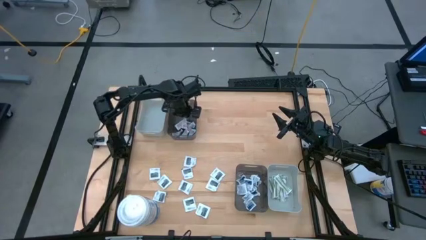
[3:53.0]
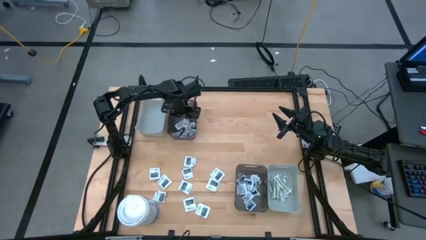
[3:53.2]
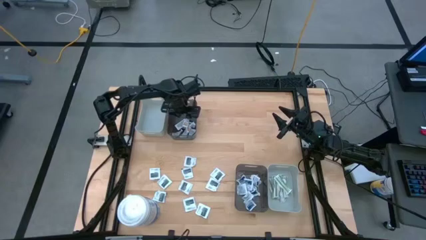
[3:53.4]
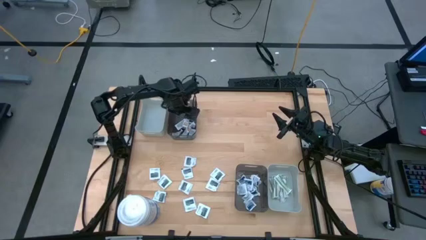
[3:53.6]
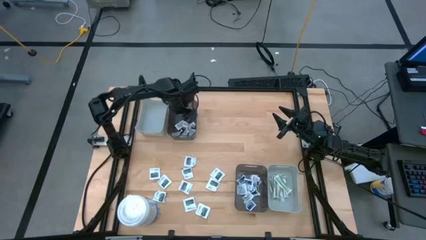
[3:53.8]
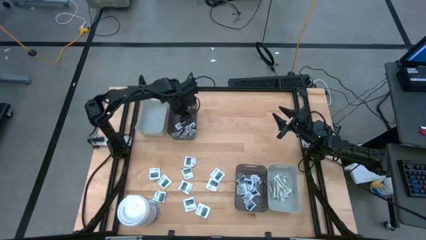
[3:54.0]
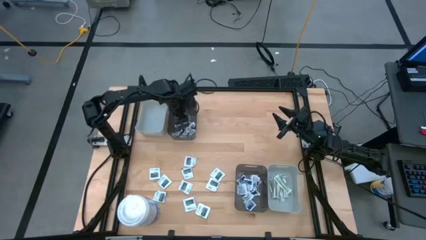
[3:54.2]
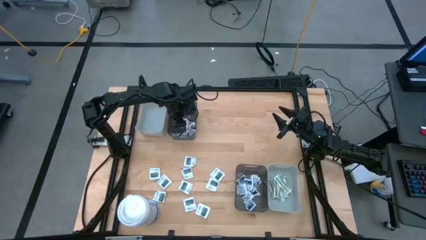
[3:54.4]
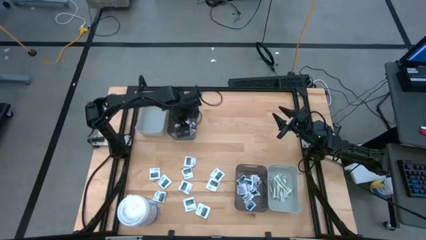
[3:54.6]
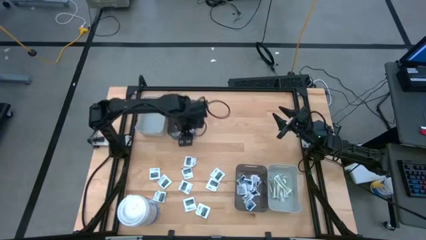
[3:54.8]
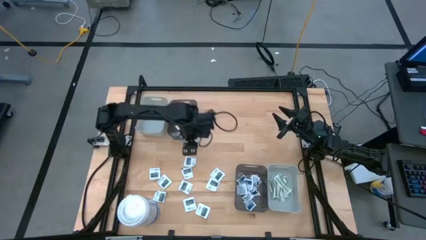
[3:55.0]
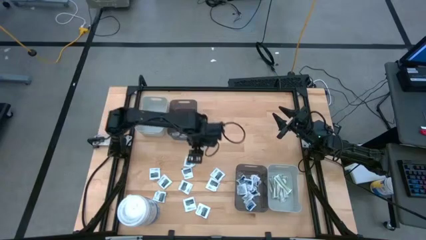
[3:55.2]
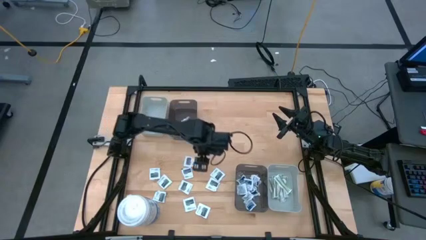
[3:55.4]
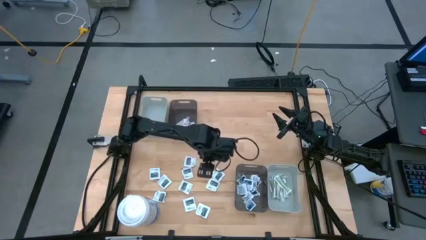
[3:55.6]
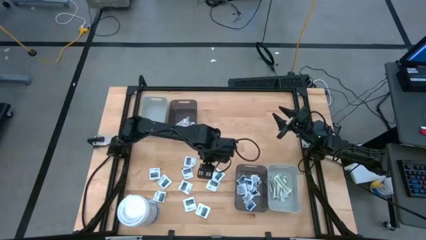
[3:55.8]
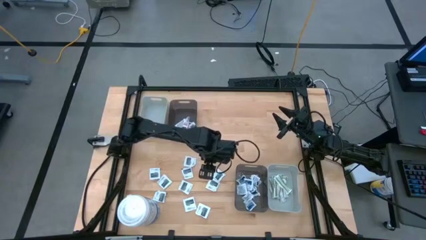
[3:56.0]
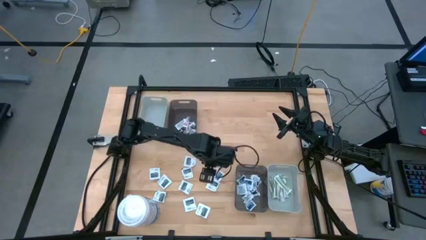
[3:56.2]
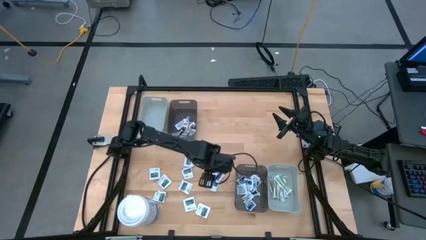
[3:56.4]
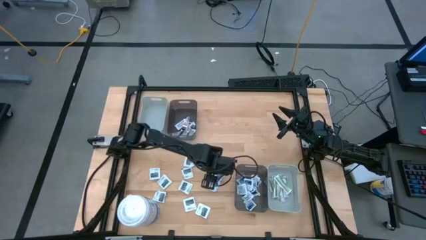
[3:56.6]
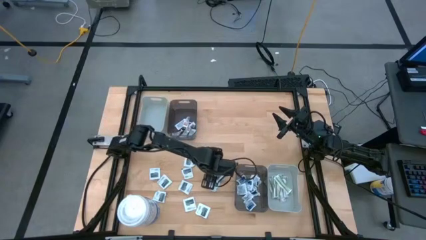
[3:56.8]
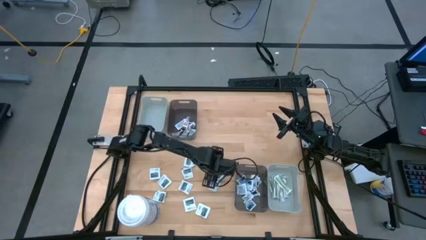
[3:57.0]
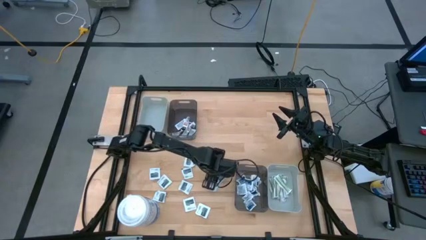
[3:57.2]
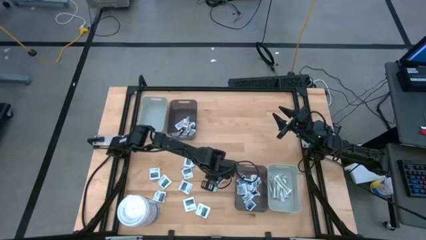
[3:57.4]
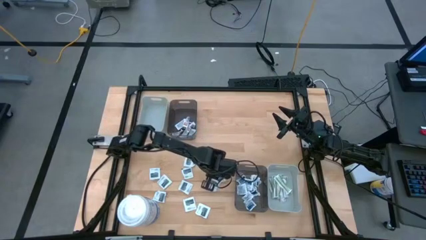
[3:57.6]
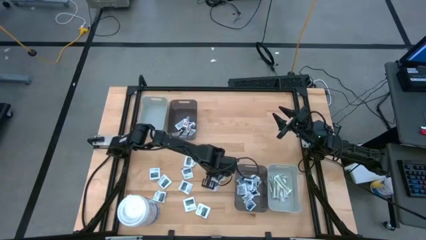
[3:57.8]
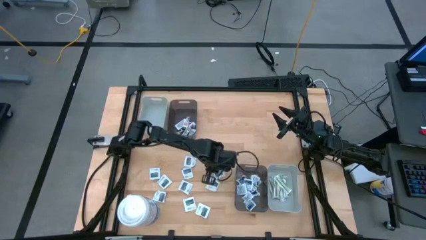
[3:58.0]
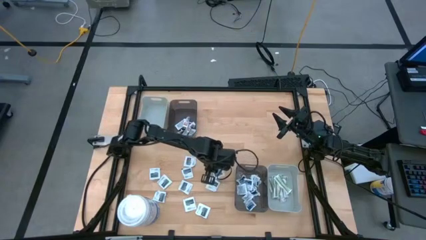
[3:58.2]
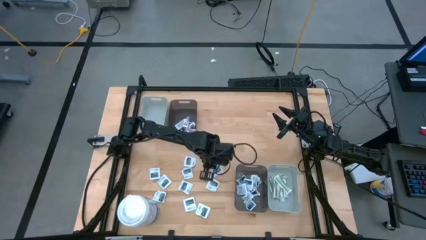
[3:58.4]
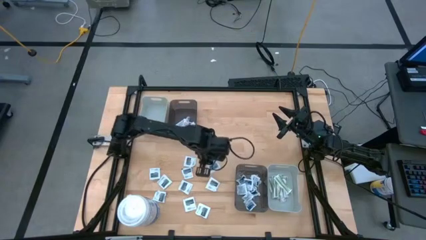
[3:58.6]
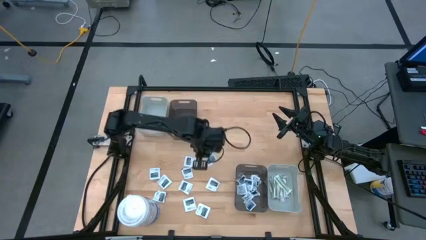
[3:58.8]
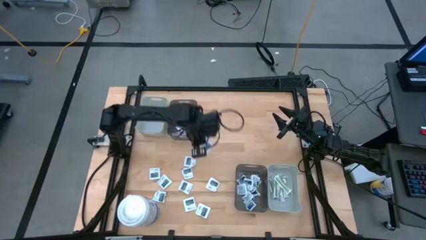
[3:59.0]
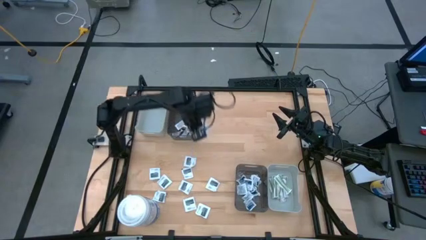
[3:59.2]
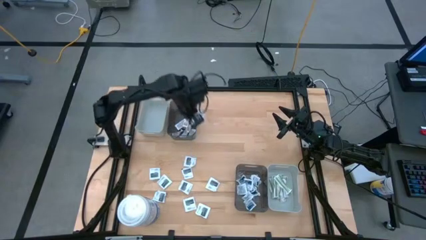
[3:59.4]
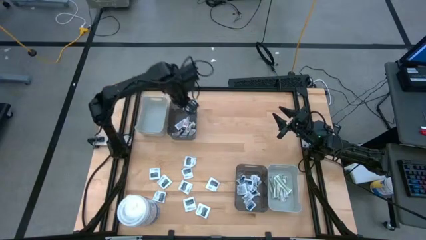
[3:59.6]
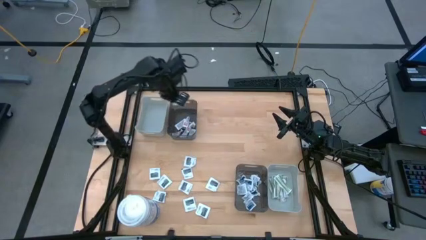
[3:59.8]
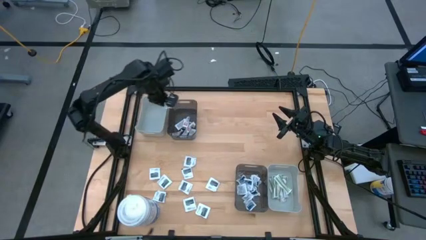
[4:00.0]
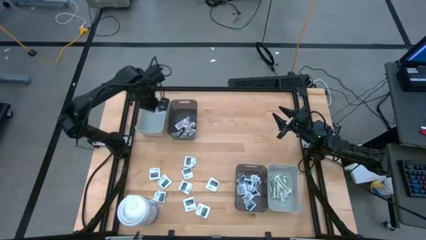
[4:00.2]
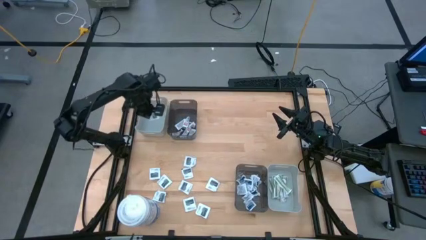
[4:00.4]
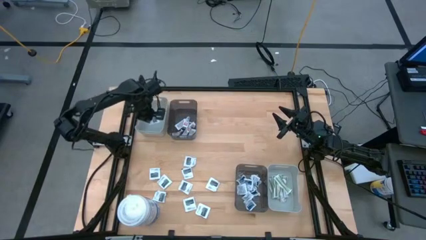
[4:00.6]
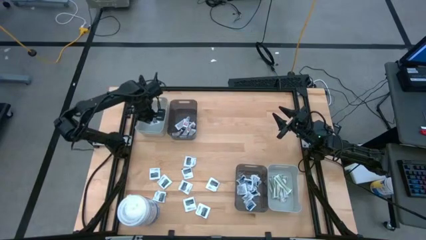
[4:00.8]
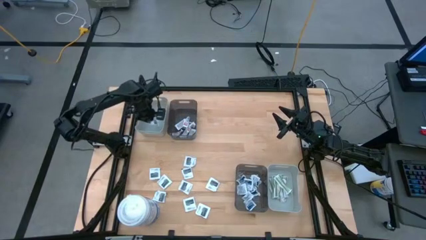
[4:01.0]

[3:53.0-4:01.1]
Task: Pick & Place First Aid Supplies
Put the white towelette pack into the top gray bin

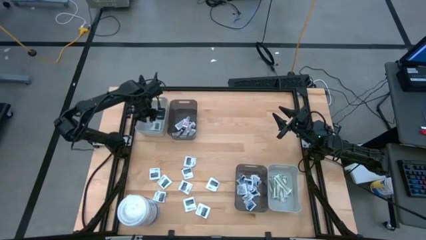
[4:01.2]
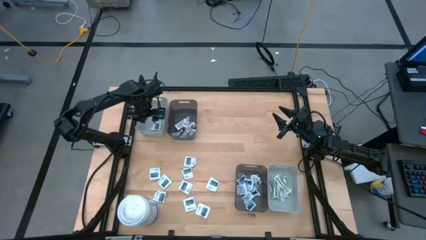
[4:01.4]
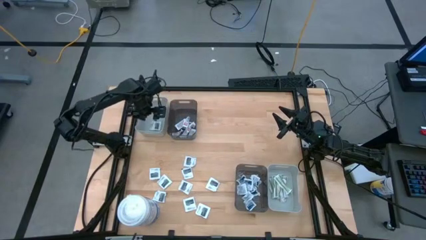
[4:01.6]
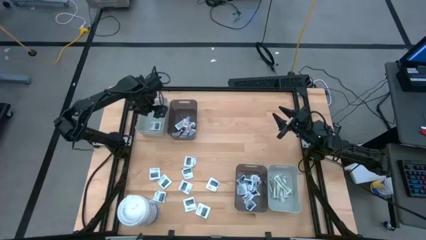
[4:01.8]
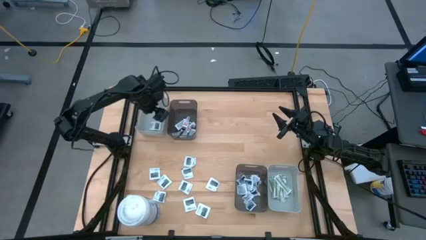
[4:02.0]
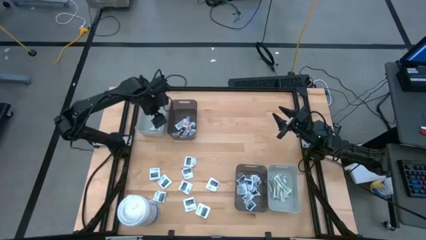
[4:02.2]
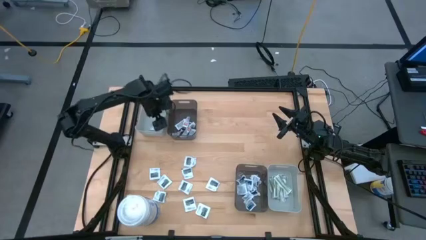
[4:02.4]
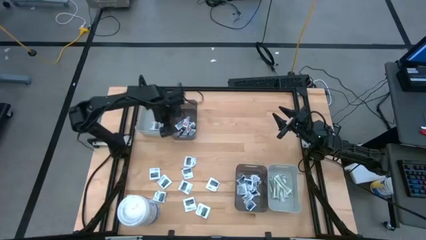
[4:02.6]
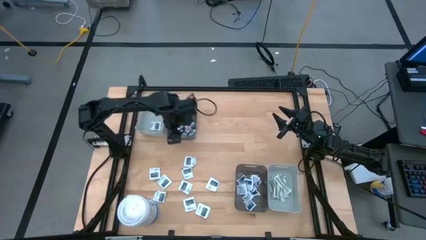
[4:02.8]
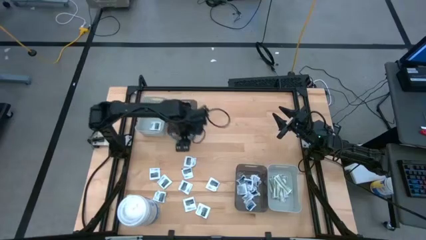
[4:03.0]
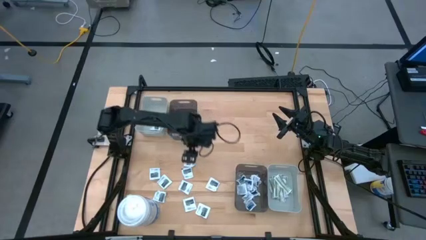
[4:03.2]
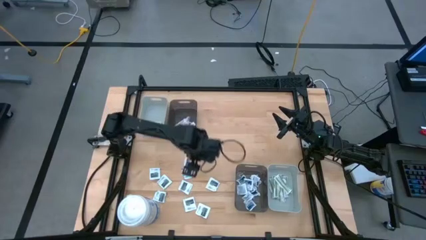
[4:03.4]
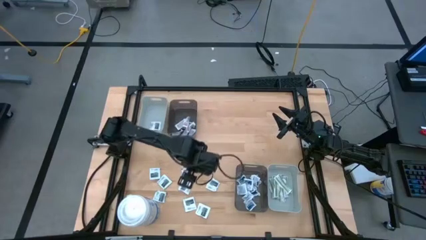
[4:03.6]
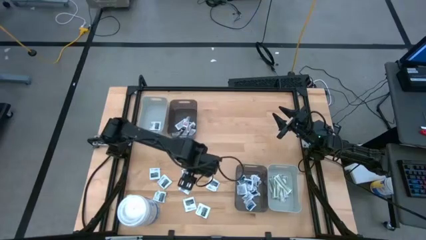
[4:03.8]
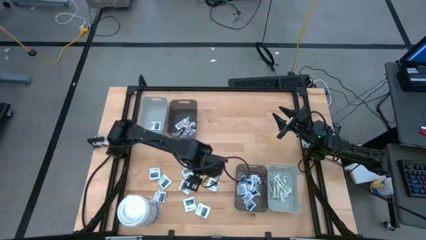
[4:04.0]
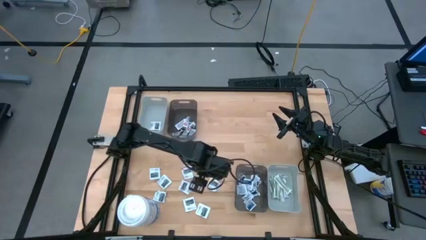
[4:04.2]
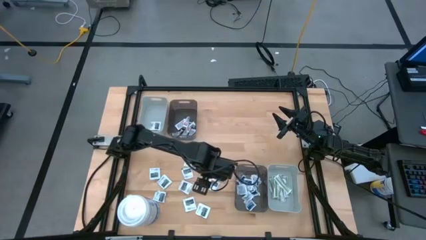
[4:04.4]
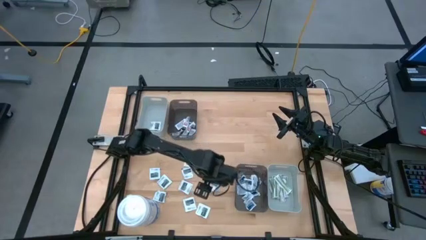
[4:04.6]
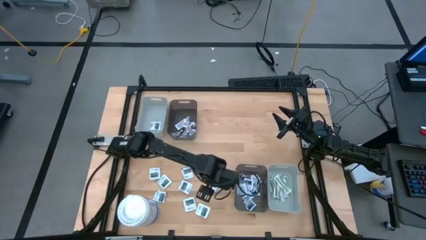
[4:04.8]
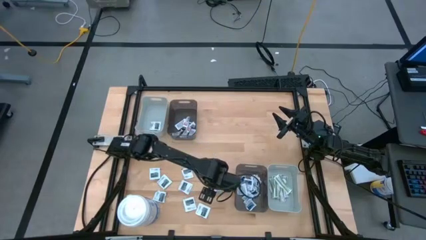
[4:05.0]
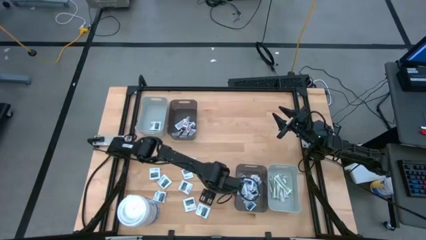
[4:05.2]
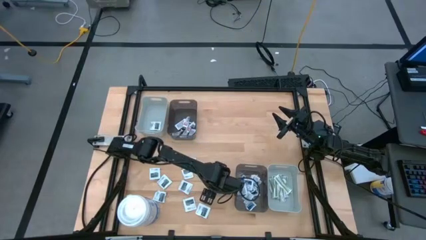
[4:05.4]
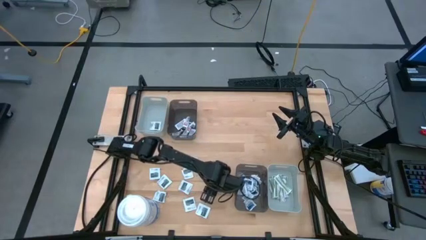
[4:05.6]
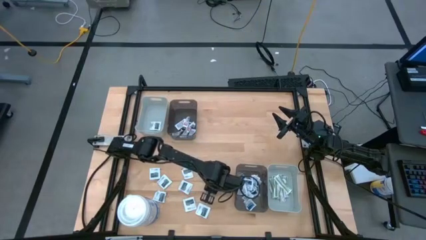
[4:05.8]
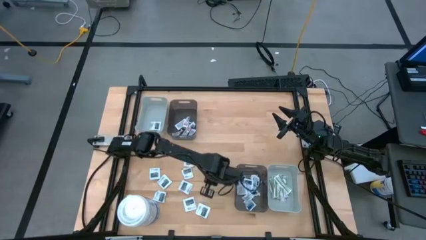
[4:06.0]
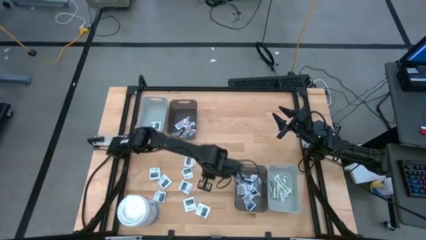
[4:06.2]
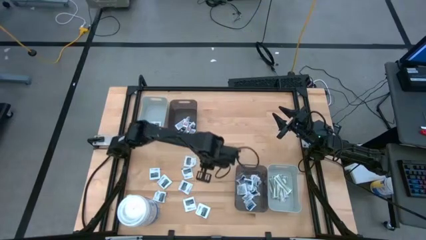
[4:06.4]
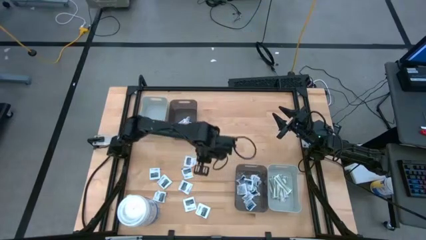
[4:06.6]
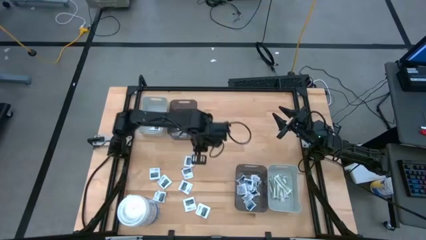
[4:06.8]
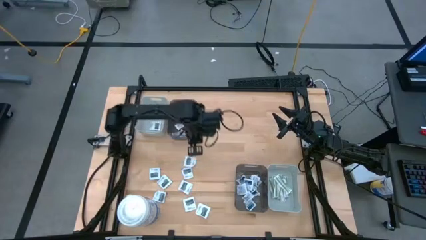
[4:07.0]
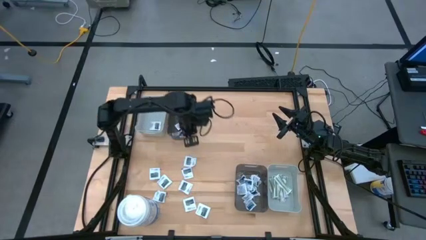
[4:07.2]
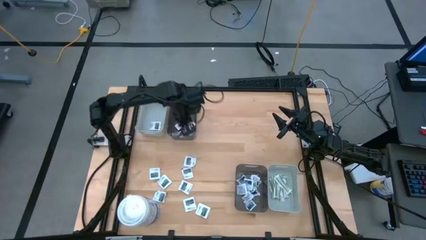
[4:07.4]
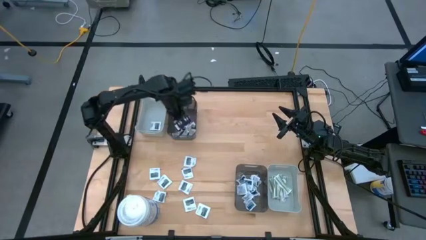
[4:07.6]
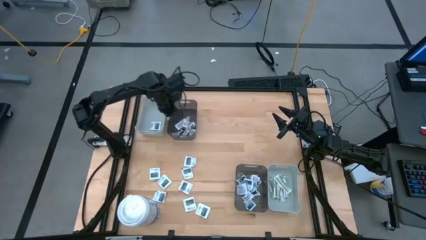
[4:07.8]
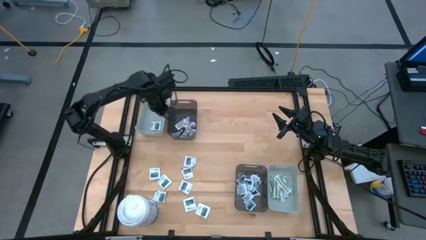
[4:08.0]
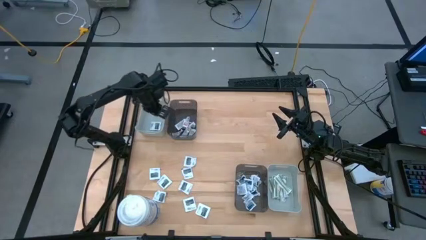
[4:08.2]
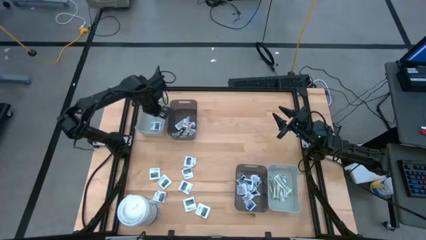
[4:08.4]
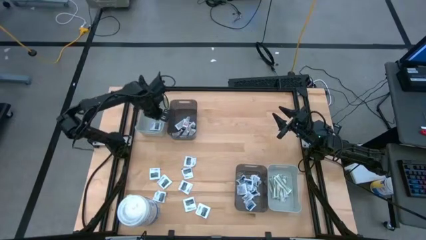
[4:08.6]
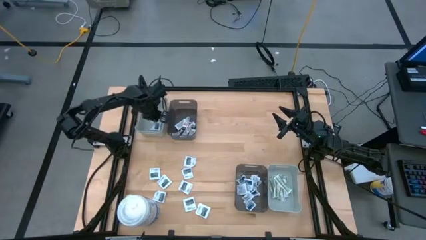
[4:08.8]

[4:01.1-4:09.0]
Put the white towelette pack into the top gray bin
